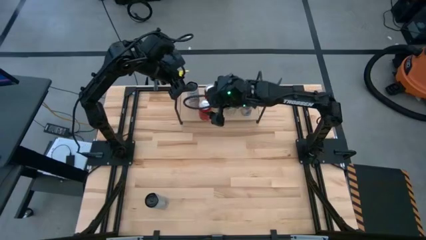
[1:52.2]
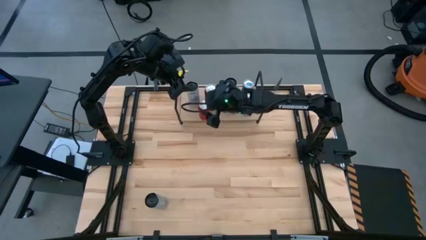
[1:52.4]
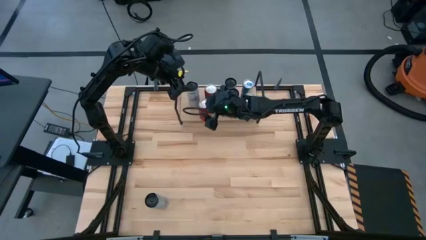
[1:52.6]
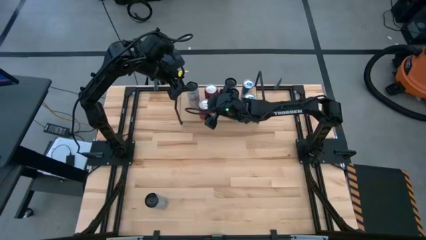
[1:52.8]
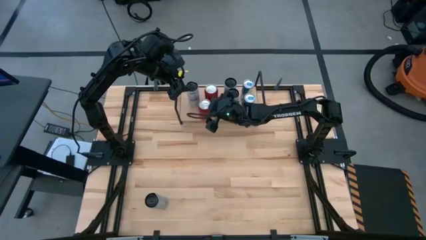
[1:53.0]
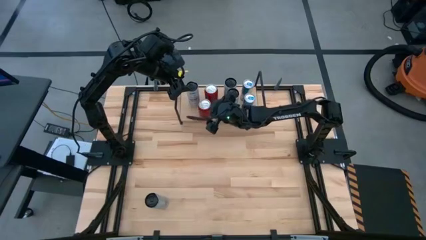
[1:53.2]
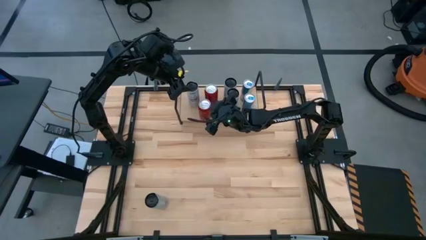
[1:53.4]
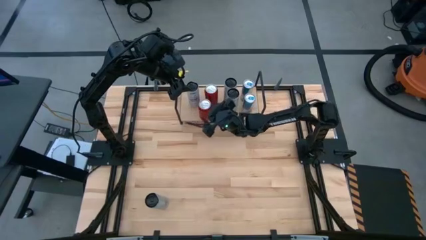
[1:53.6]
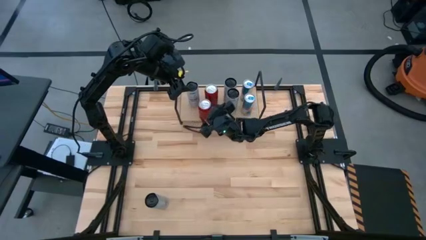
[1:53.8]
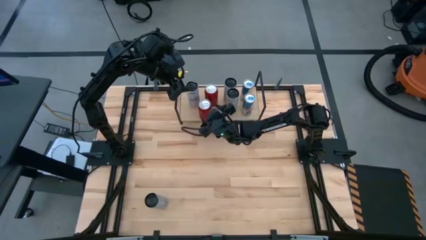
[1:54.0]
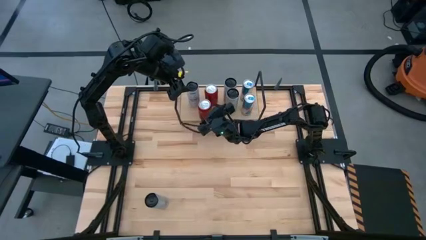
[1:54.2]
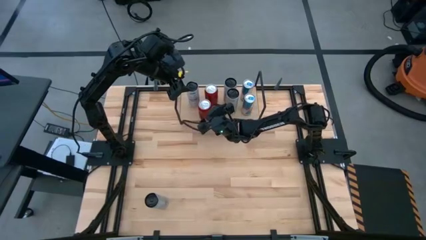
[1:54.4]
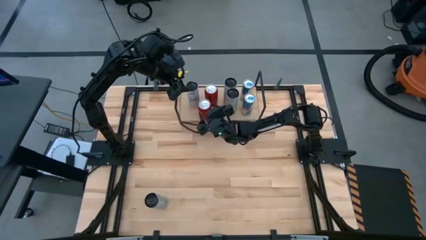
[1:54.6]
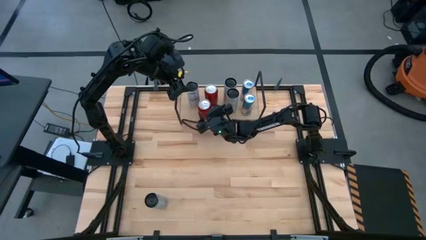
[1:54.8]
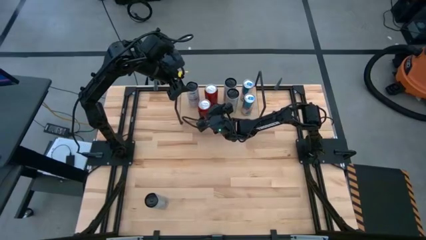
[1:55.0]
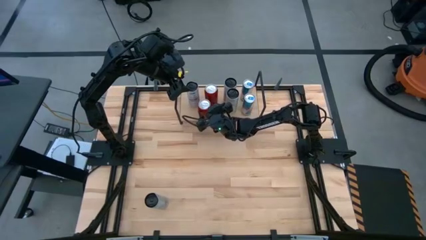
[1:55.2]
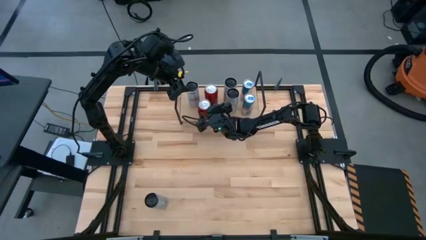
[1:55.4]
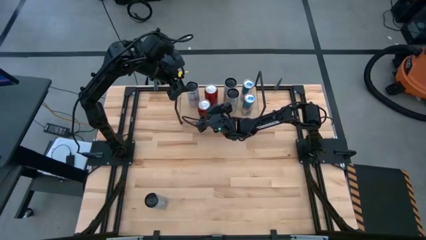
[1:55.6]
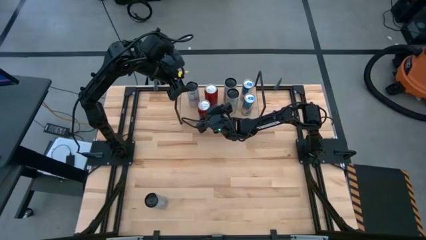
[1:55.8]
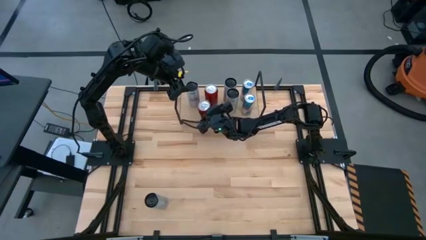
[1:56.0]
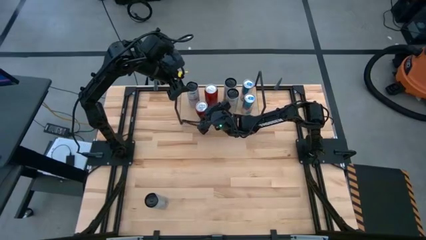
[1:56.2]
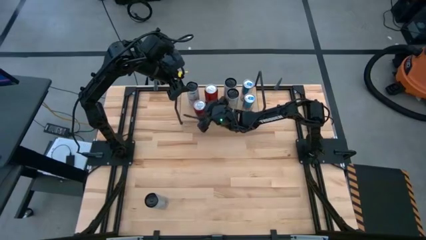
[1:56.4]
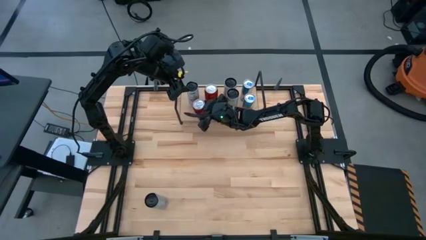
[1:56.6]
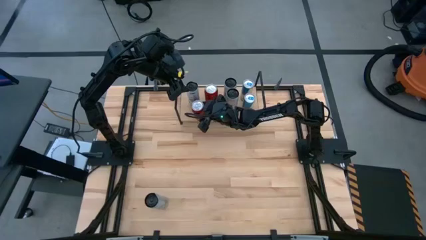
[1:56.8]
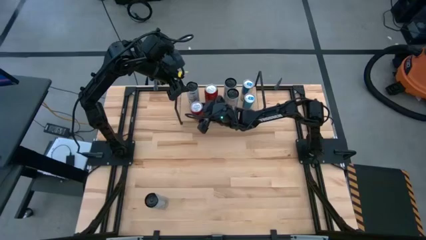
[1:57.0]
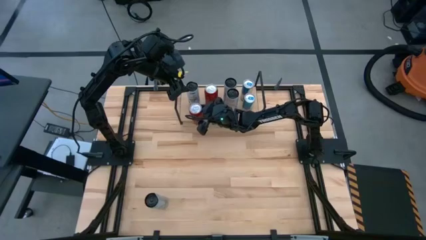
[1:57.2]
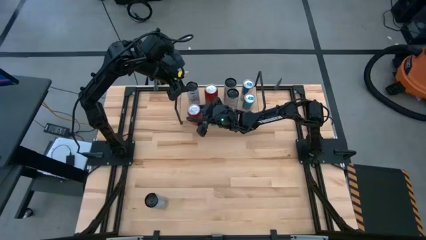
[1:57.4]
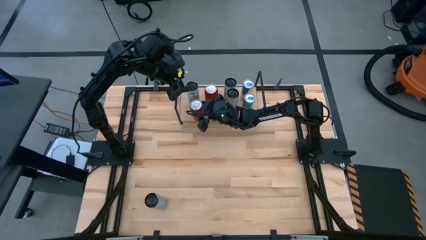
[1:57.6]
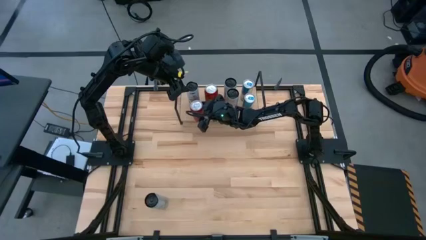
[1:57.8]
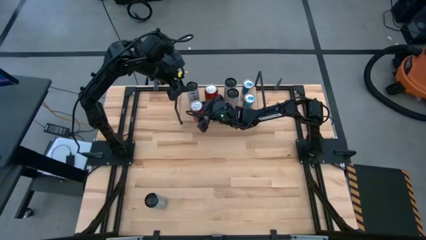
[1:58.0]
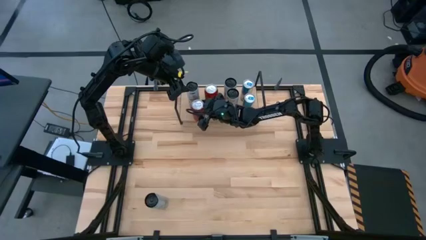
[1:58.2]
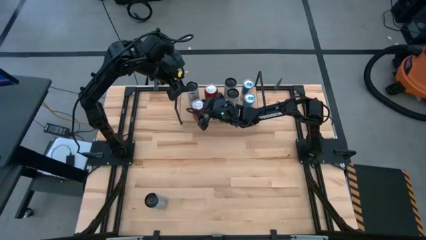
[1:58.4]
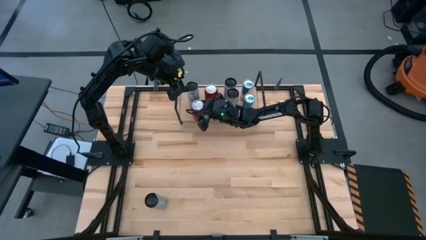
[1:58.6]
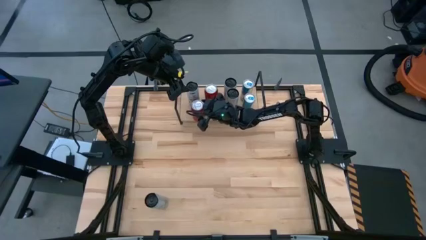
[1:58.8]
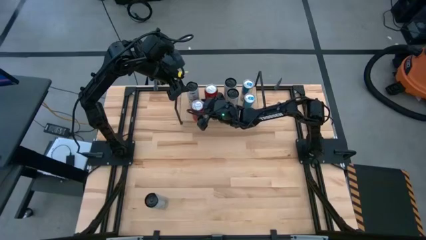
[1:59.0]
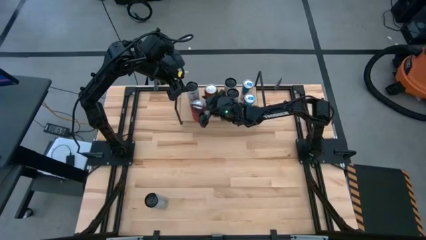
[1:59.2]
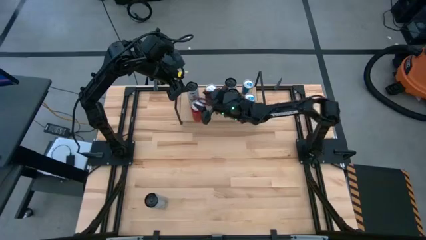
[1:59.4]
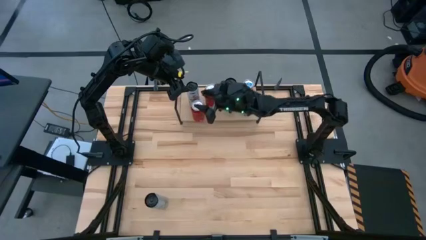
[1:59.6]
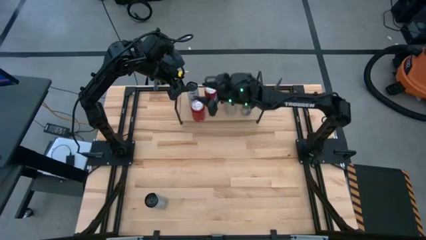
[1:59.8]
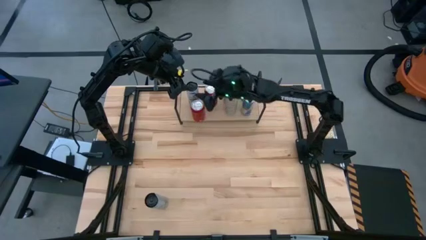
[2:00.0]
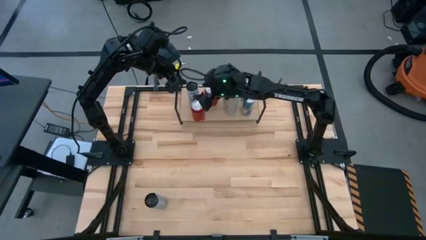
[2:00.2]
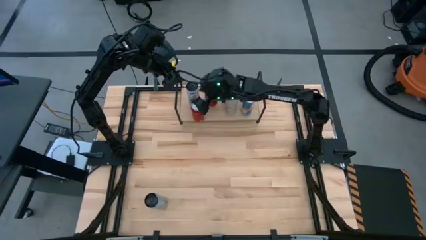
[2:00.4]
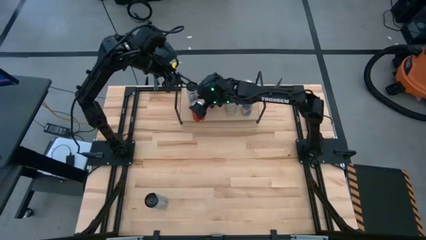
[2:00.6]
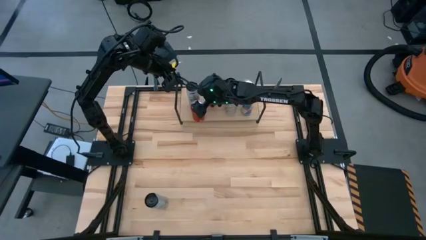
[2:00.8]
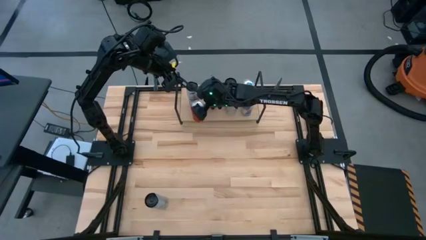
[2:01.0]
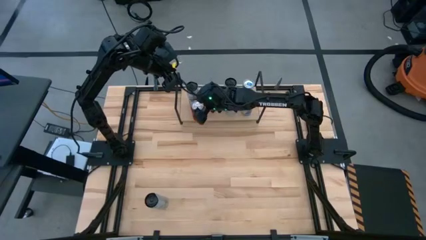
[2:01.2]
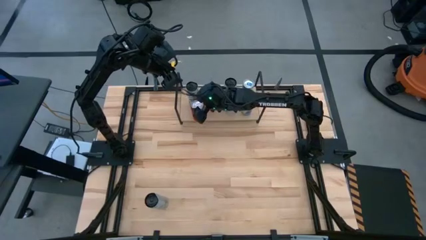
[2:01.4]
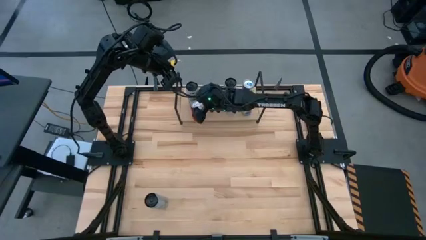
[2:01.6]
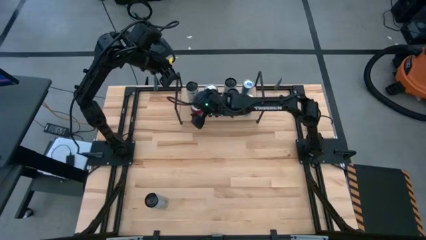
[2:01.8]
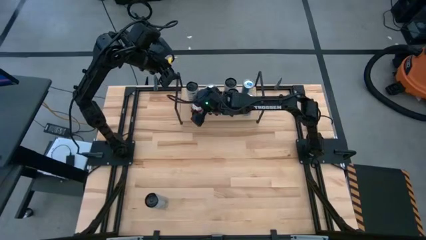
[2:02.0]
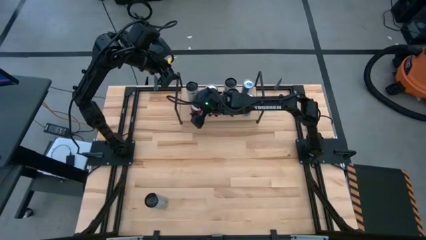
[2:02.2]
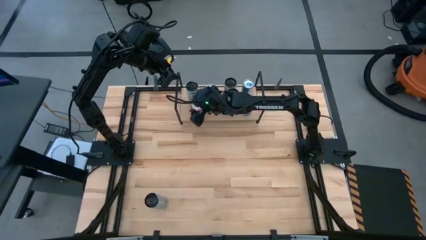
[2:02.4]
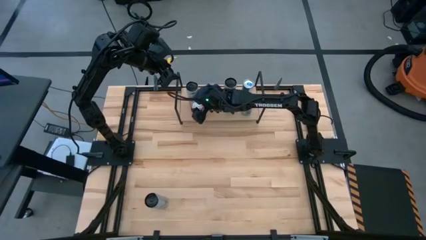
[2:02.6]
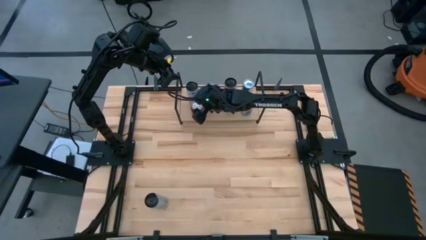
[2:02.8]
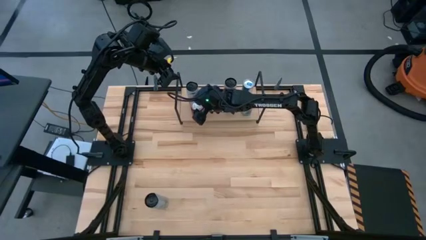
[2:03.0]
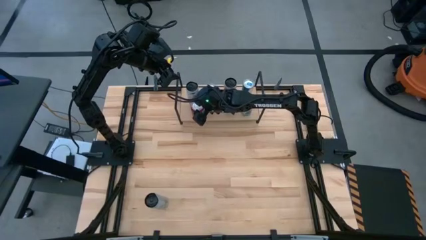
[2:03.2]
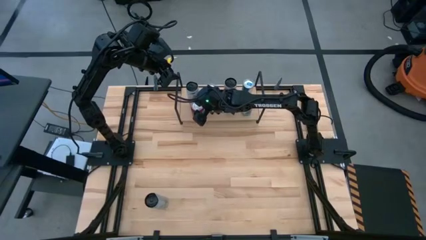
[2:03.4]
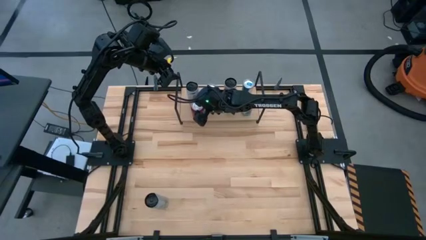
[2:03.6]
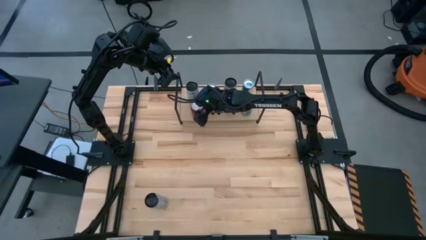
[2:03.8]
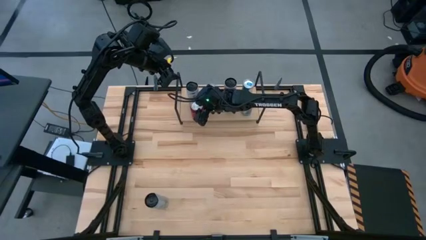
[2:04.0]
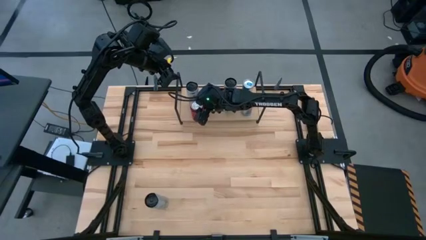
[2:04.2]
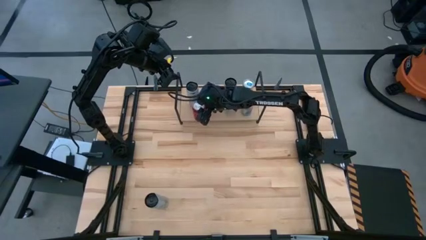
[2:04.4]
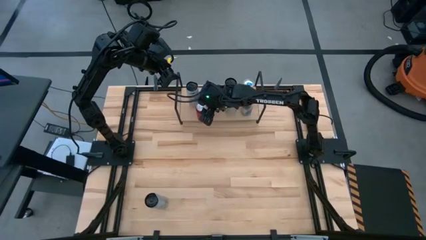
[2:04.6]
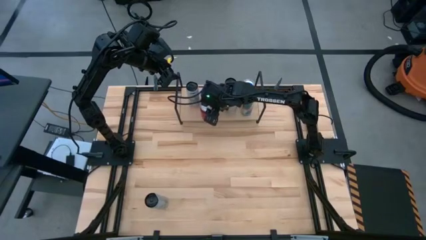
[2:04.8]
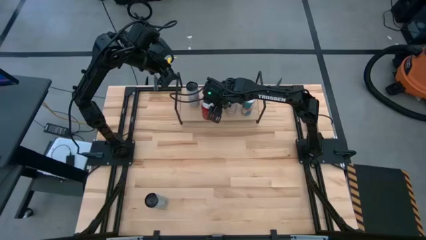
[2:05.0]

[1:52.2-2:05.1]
Task: Place canned beverage on shelf
Put the red-black soda can aligned with the other red-black soda can on the shelf

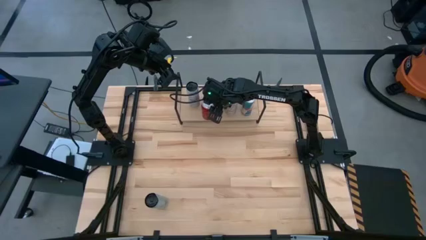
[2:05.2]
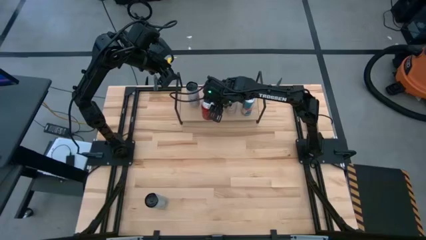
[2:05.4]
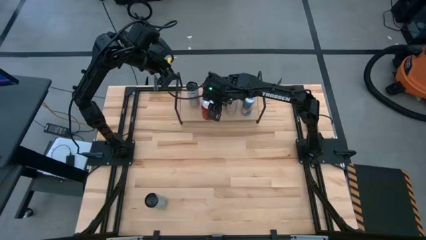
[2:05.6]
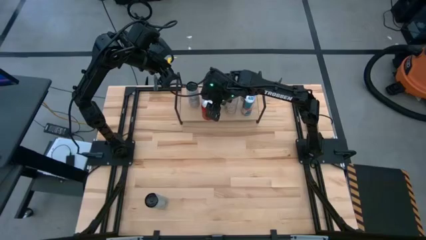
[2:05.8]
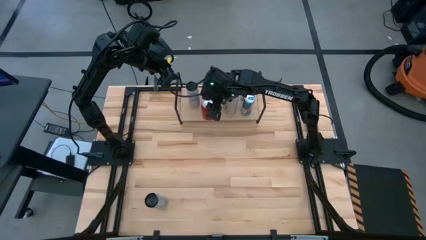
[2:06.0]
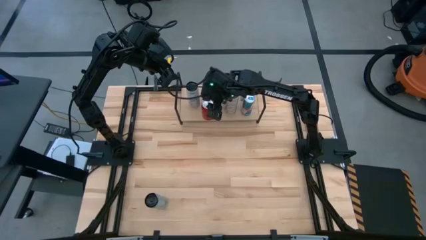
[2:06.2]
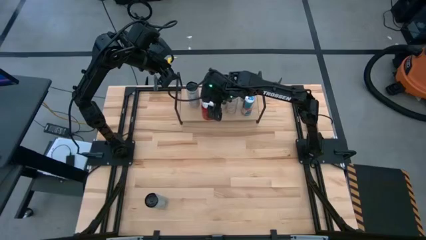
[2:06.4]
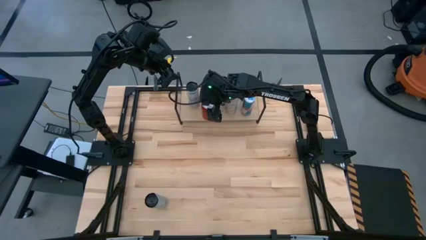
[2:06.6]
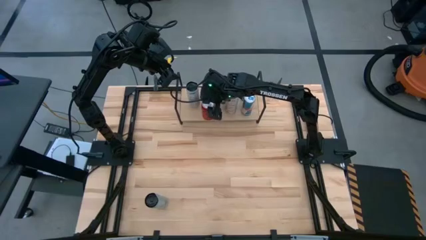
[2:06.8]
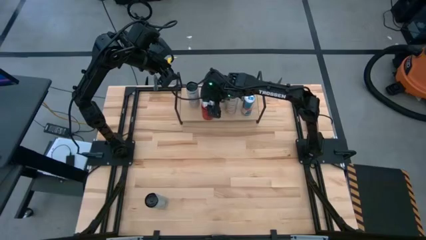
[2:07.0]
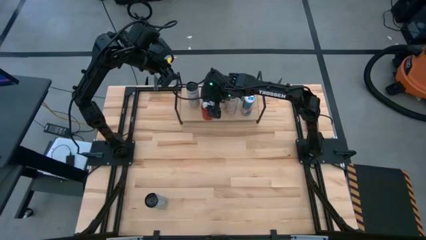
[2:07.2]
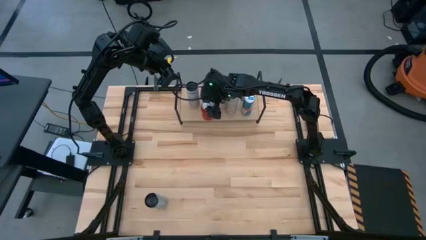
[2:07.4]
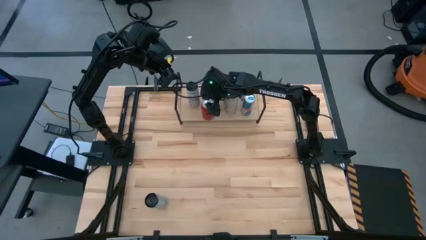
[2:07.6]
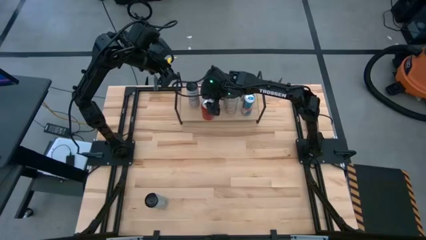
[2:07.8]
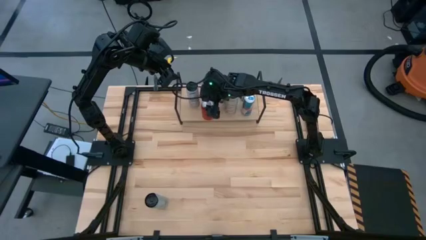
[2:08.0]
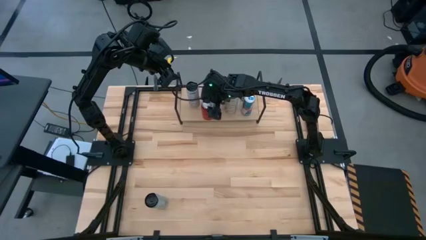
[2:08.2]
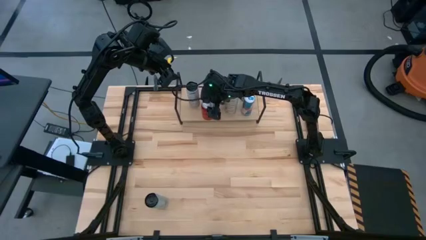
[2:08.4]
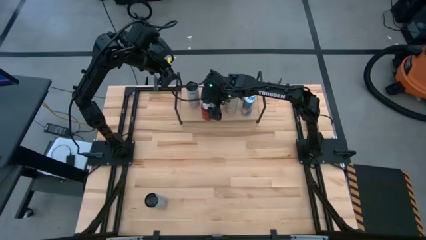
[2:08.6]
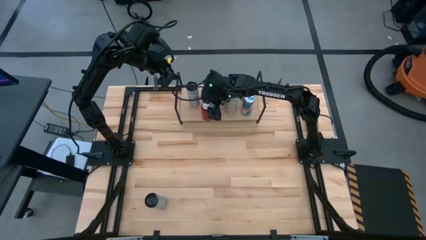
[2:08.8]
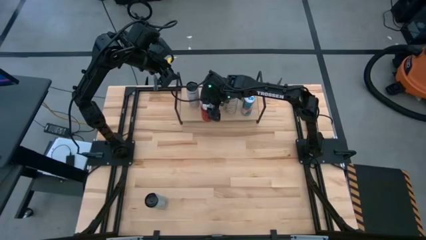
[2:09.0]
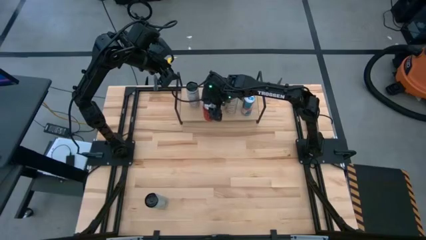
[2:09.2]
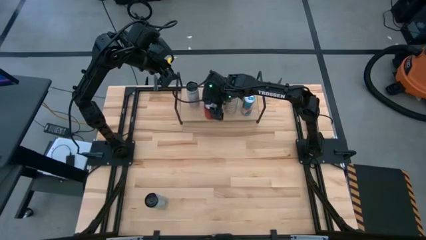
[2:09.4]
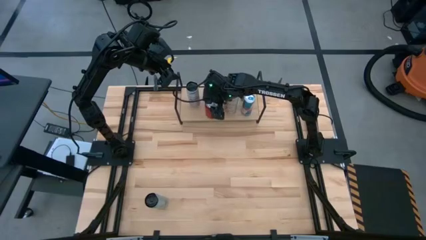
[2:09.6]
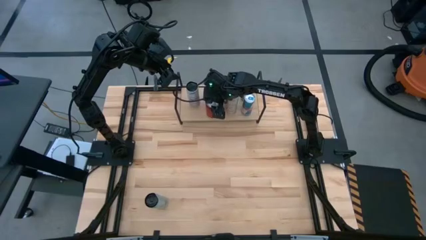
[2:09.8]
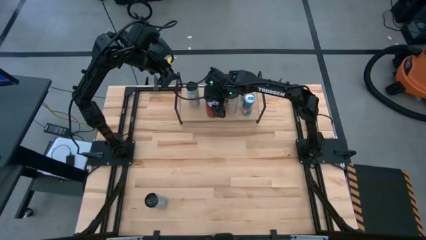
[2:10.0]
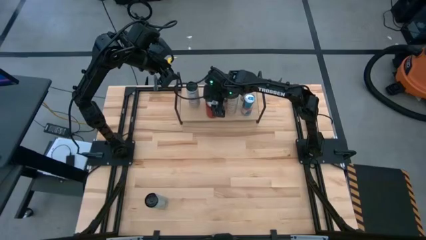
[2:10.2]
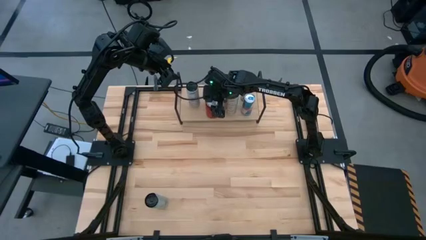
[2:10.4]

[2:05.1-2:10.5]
Put the red-black soda can aligned with the other red-black soda can on the shelf
